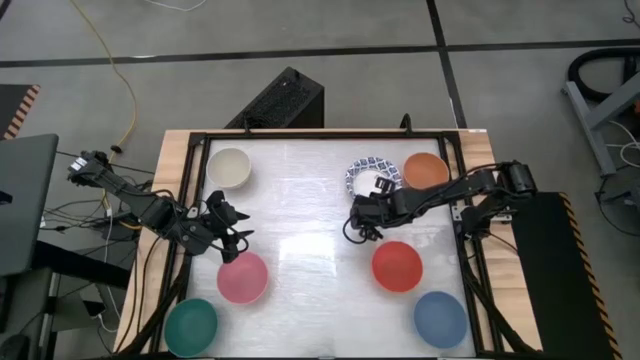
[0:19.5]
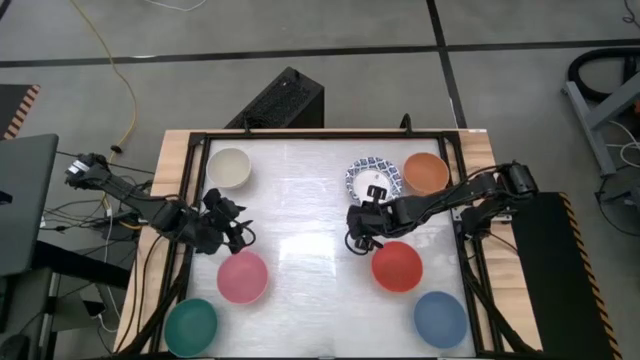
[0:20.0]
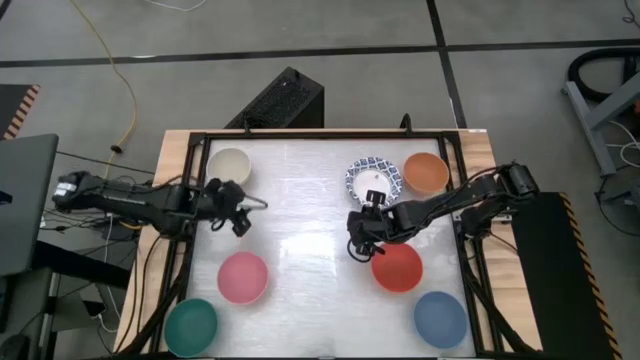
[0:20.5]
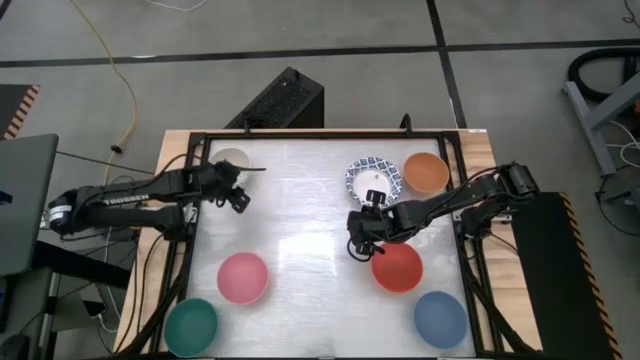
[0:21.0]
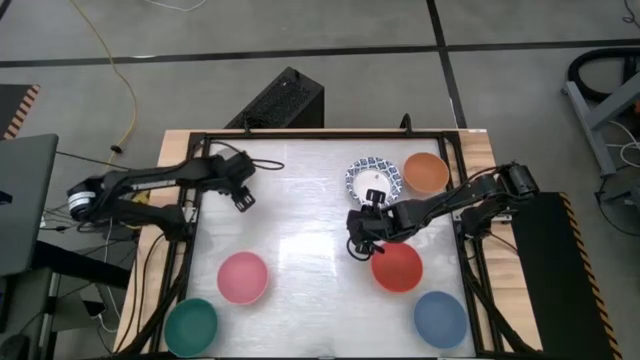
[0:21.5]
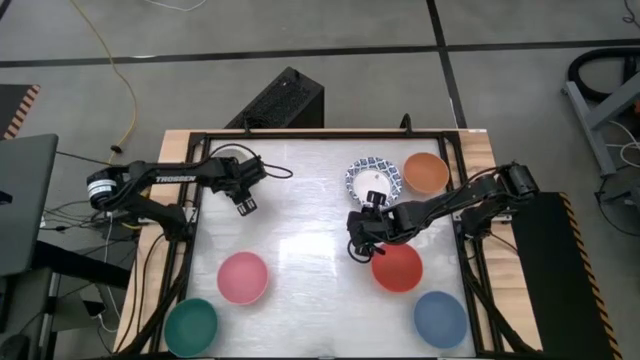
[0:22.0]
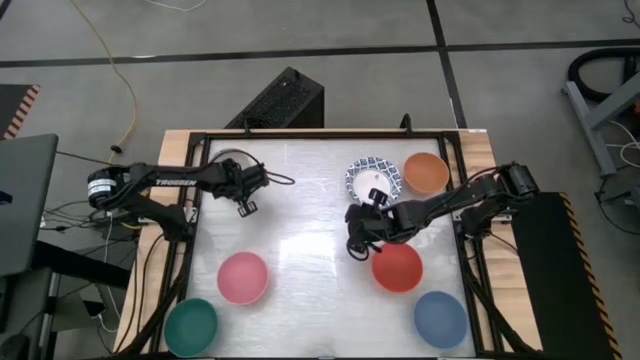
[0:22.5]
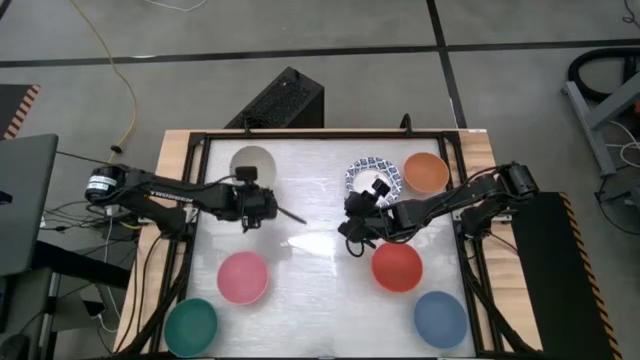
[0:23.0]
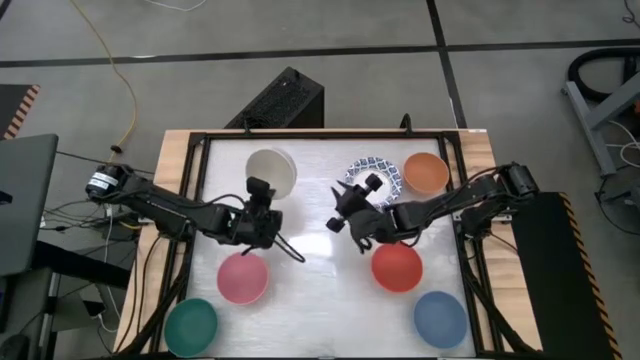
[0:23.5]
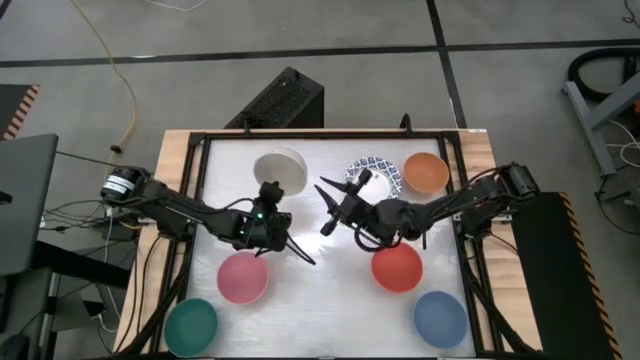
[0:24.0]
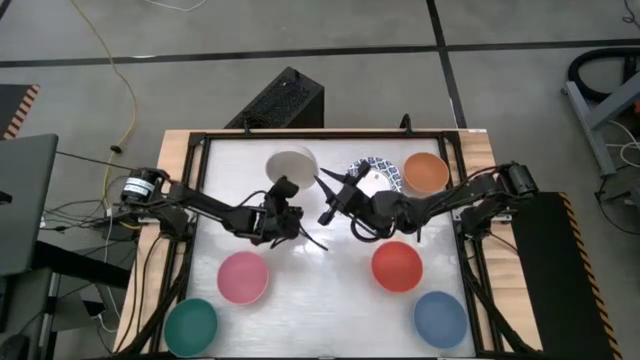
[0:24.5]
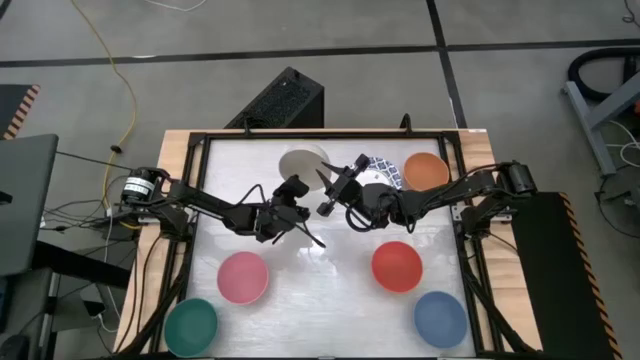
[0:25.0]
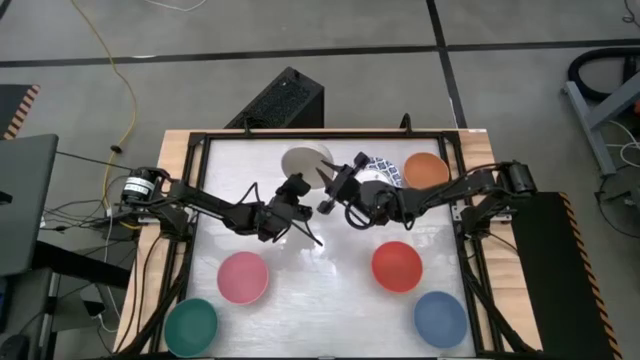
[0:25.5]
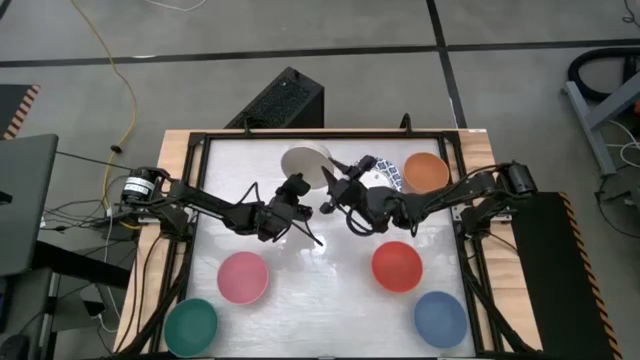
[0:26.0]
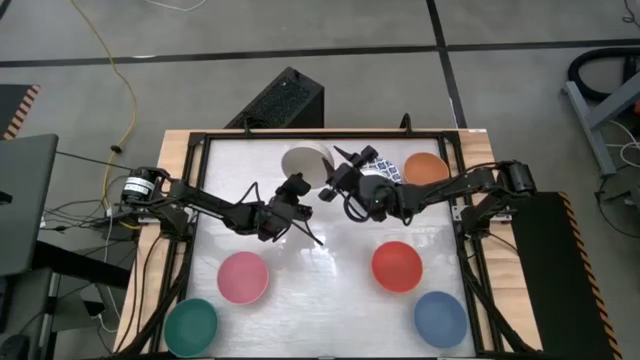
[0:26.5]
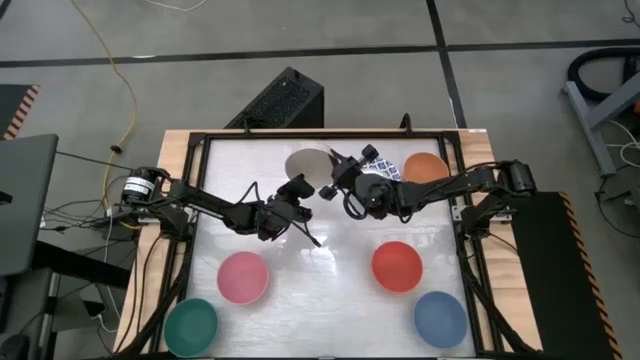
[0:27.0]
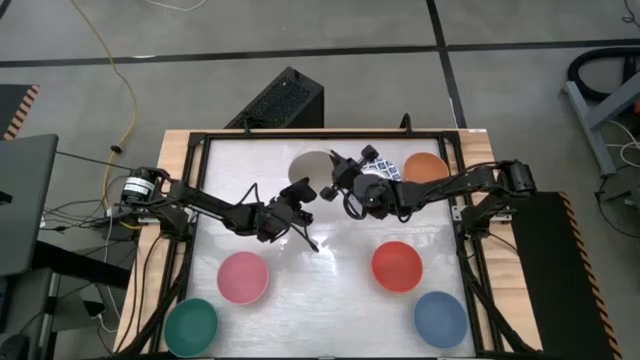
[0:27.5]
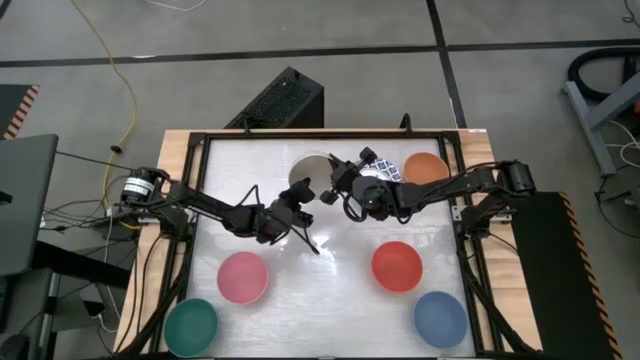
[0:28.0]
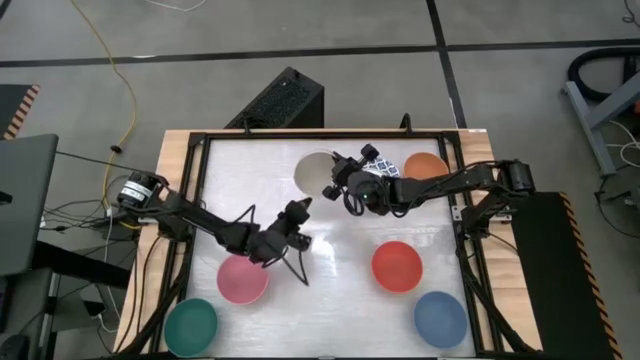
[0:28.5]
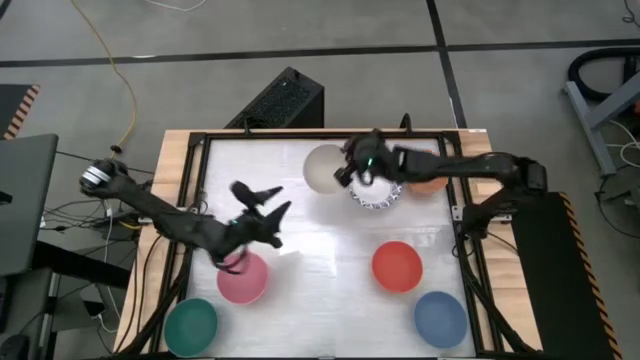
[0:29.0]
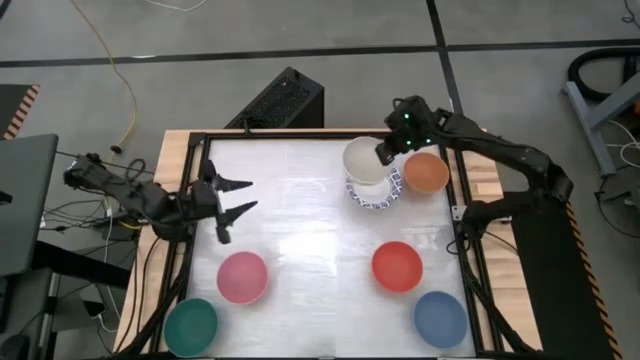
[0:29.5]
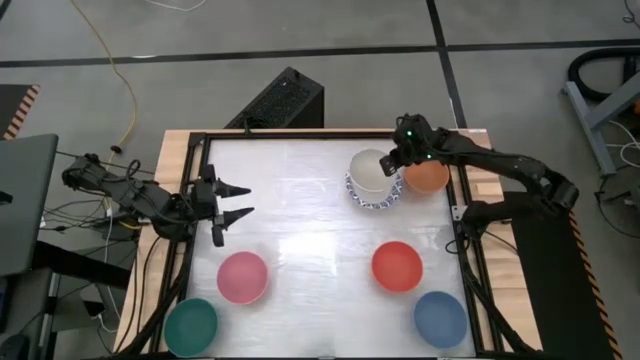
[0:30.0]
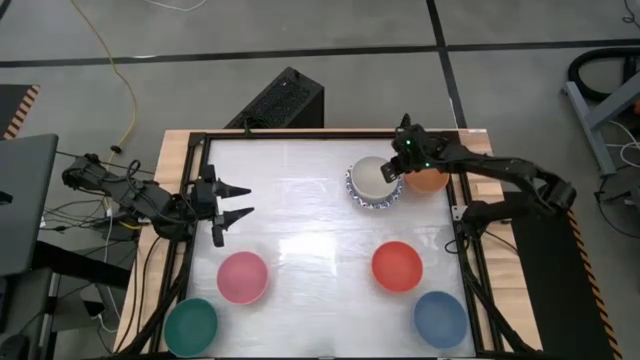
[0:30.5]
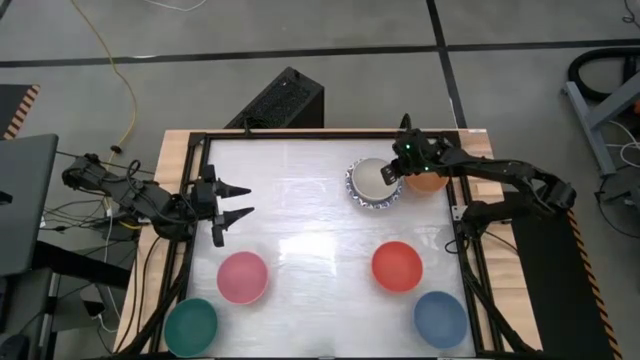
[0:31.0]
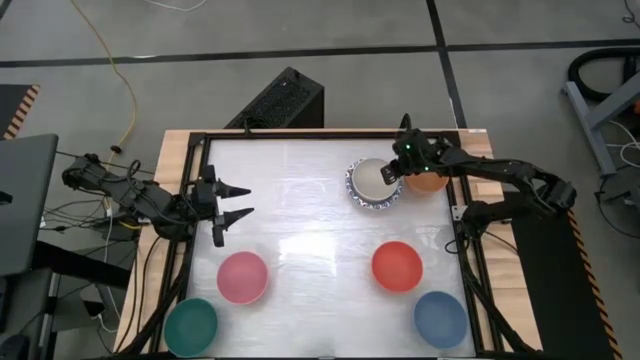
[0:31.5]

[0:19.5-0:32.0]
Stack the gray bowl on top of the white patterned bowl
